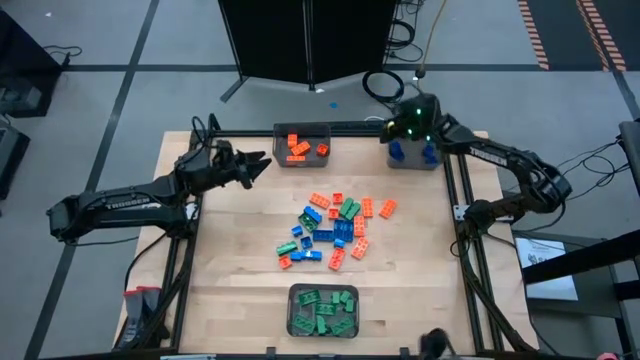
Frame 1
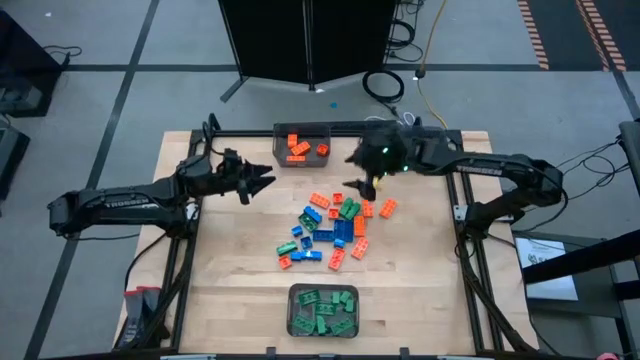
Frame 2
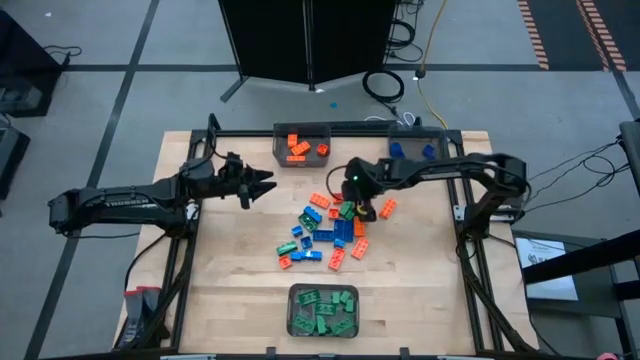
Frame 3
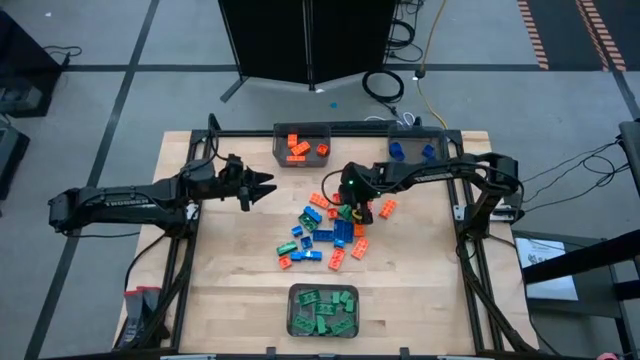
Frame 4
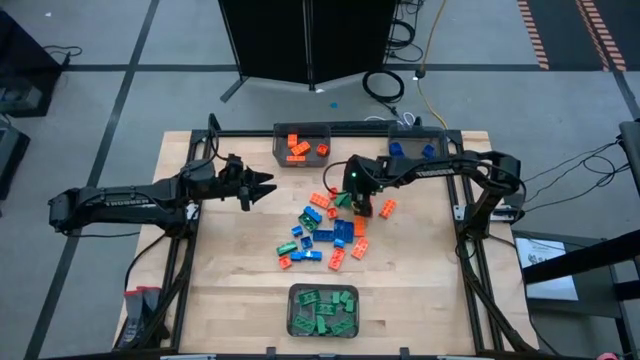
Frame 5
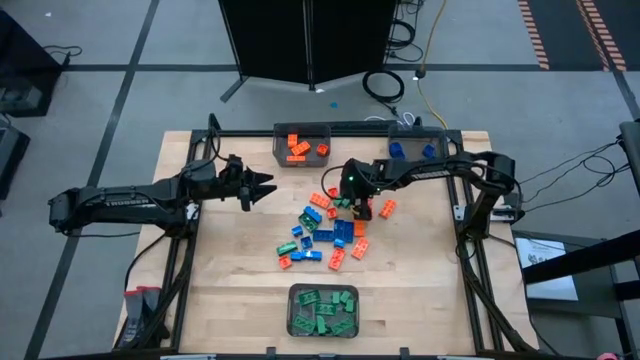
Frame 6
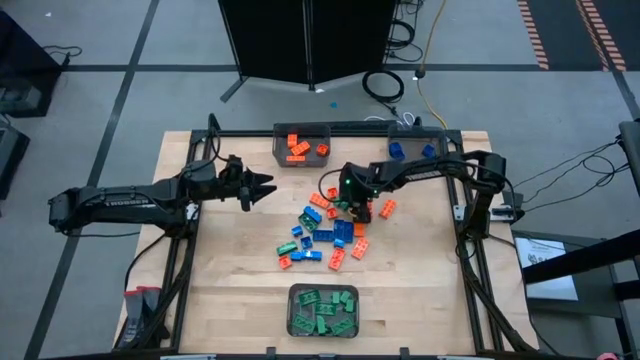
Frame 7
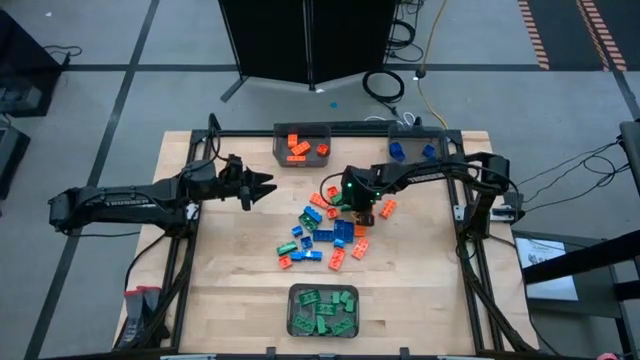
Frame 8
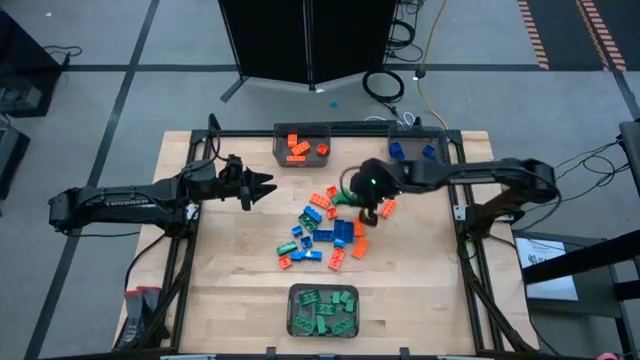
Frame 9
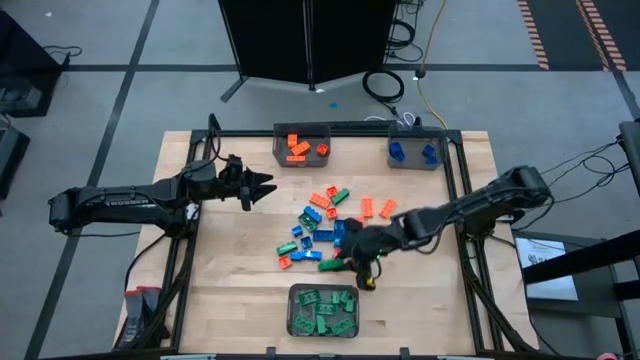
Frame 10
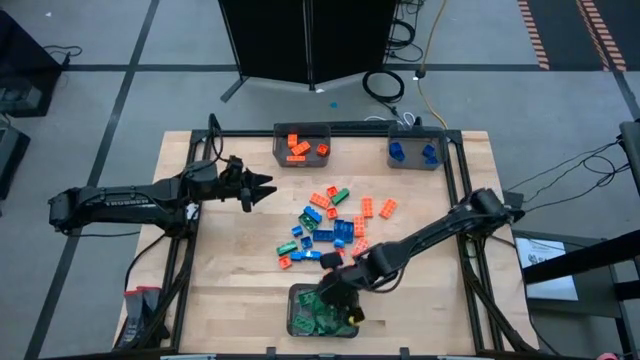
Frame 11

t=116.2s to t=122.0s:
Task: Sort blocks
Put the green game piece into the bottom black bin

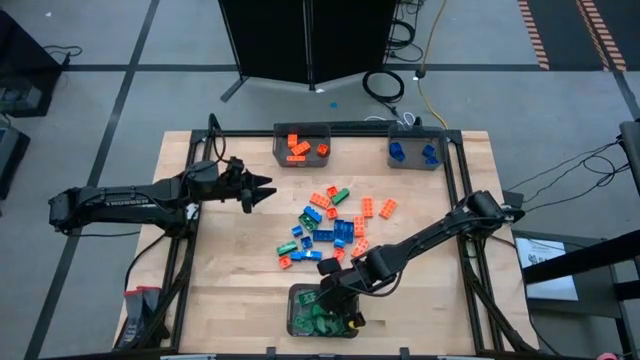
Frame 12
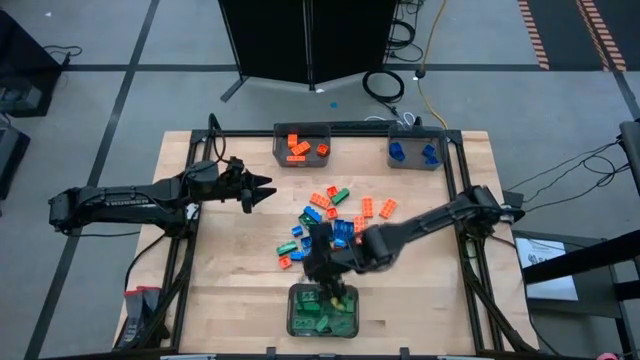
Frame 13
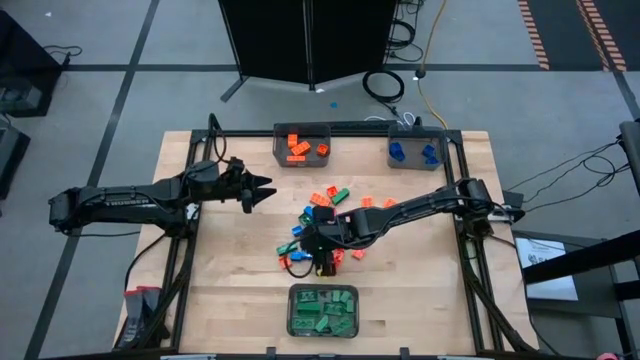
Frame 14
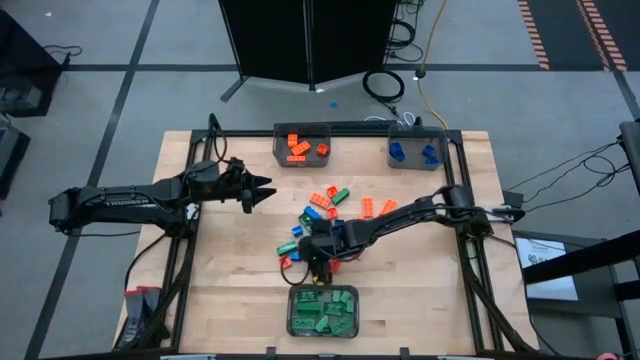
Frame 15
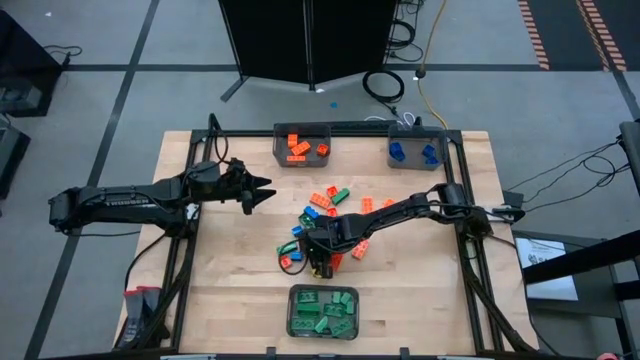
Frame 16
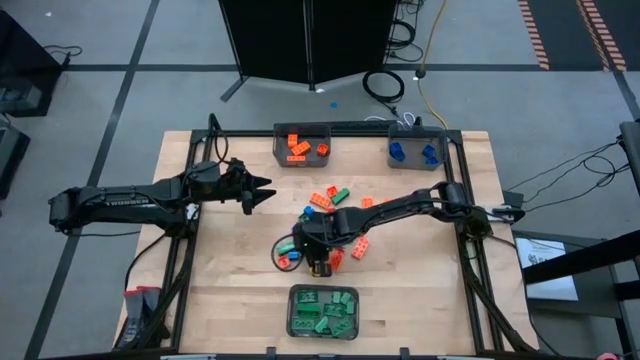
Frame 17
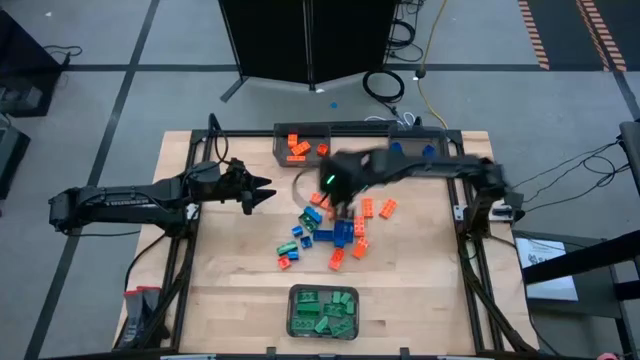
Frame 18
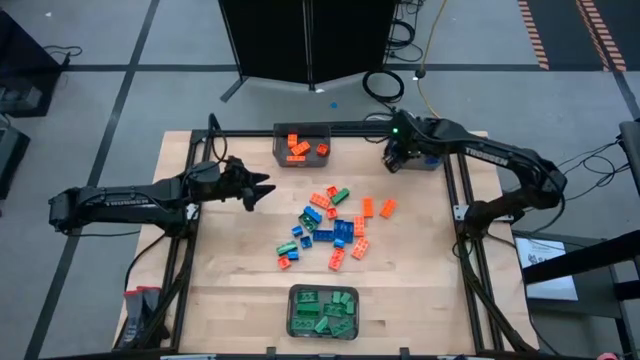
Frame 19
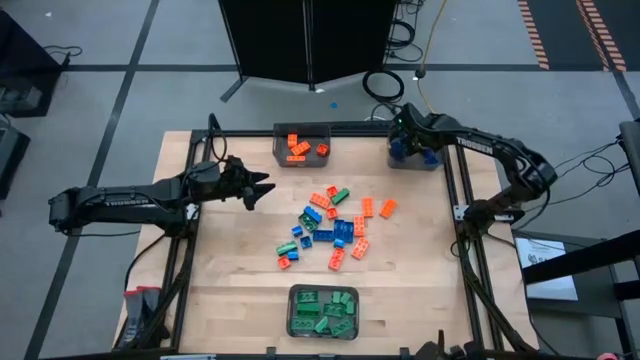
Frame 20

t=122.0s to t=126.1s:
Put the blue game piece into the top right black bin

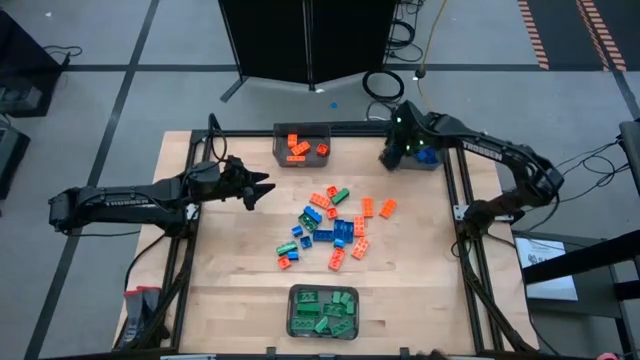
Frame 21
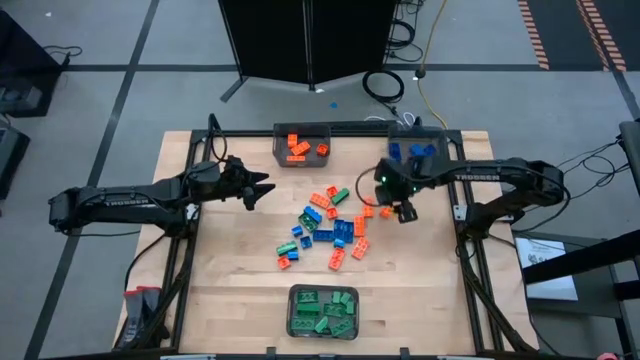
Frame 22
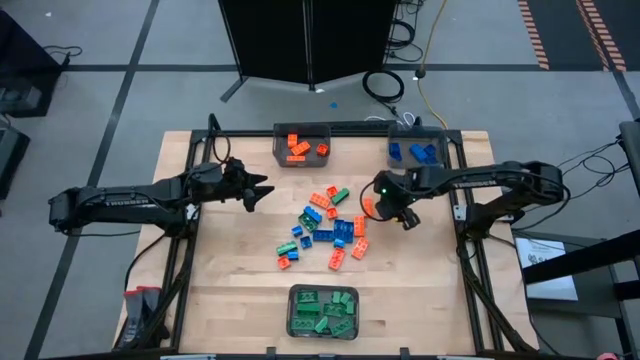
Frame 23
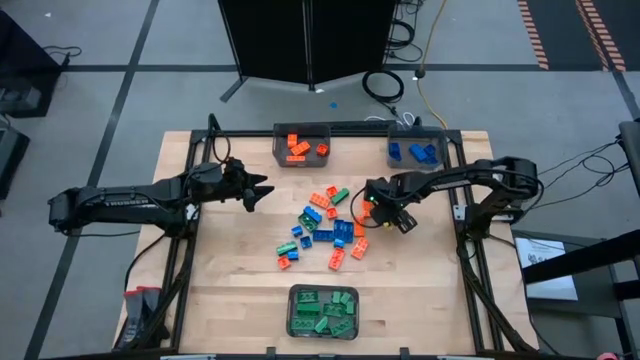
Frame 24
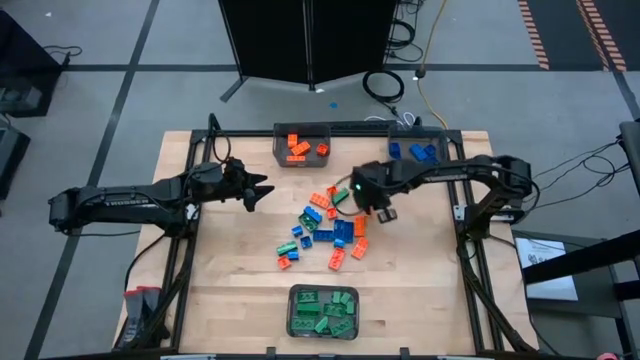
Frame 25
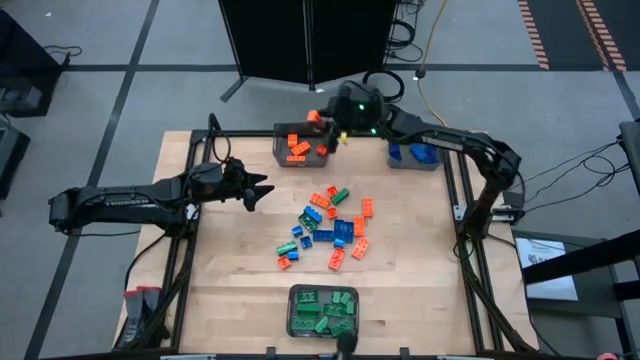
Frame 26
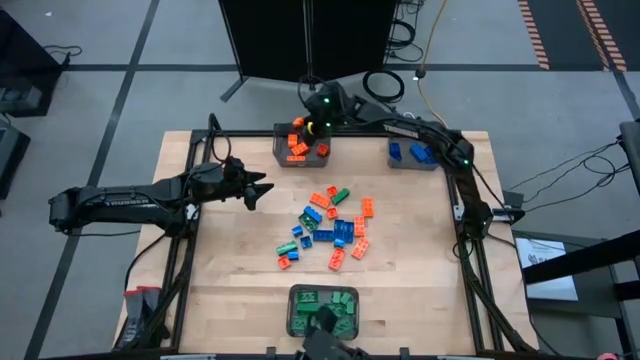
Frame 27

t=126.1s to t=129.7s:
Put the orange game piece into the top left black bin

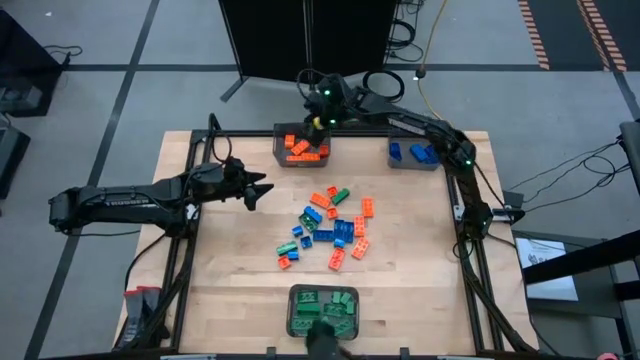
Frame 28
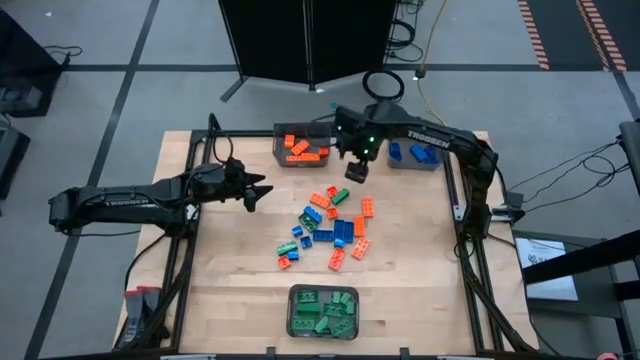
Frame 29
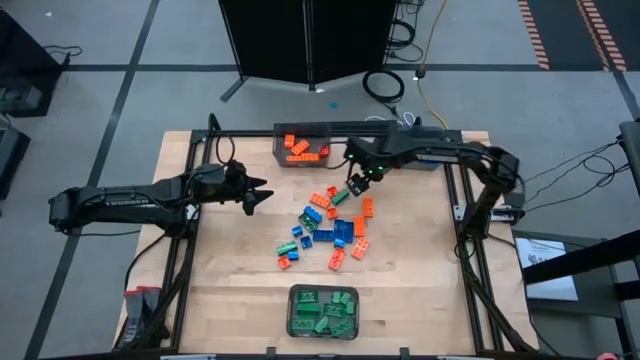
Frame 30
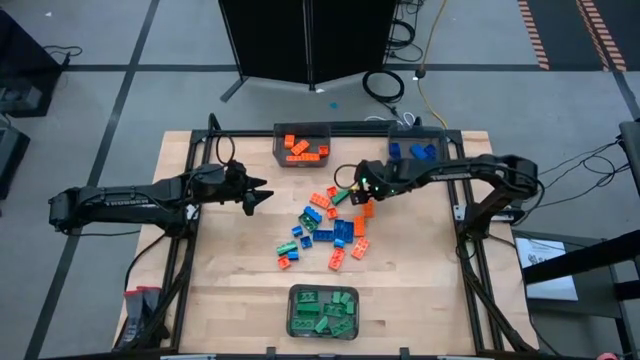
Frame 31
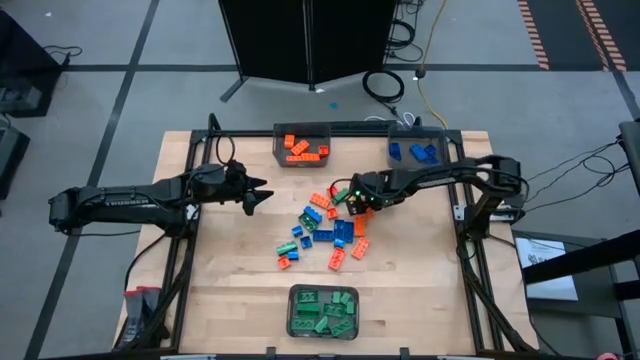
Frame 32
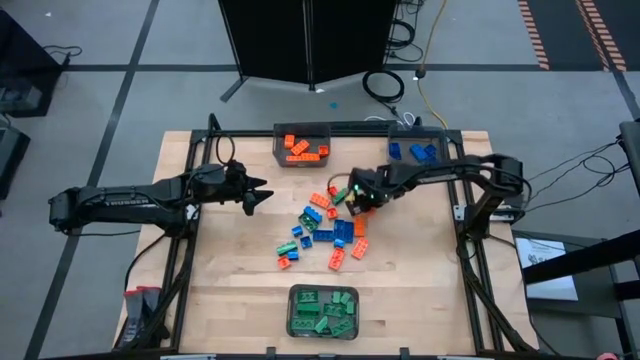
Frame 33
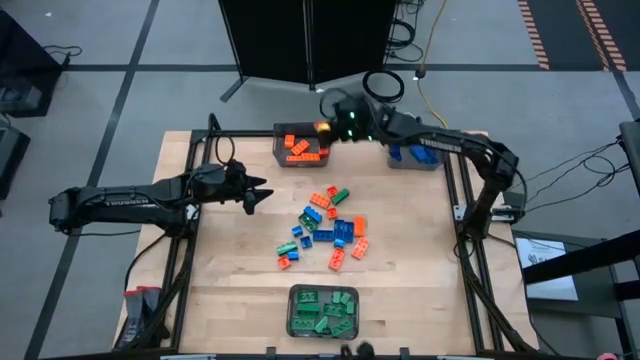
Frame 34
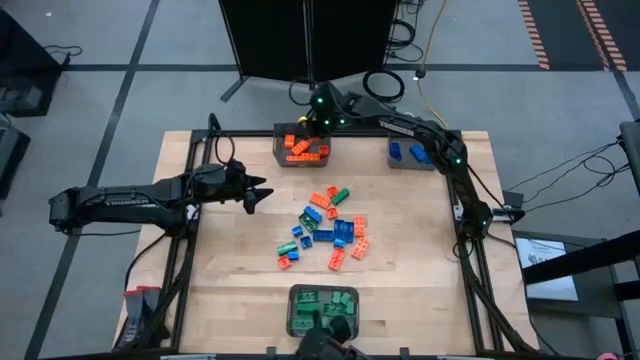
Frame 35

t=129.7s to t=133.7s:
Put the orange game piece into the top left black bin

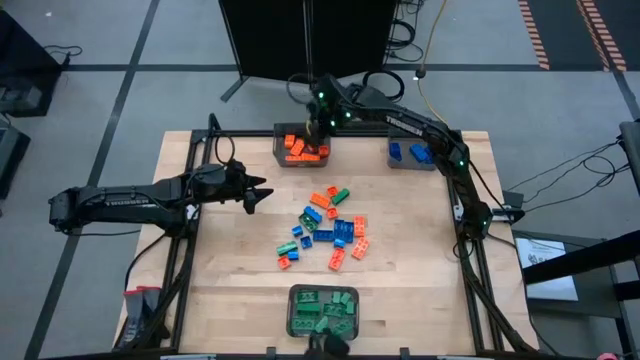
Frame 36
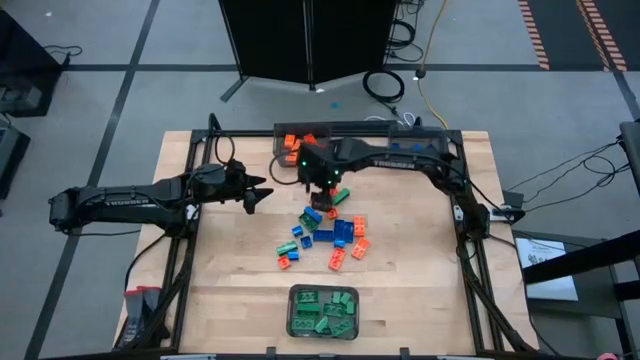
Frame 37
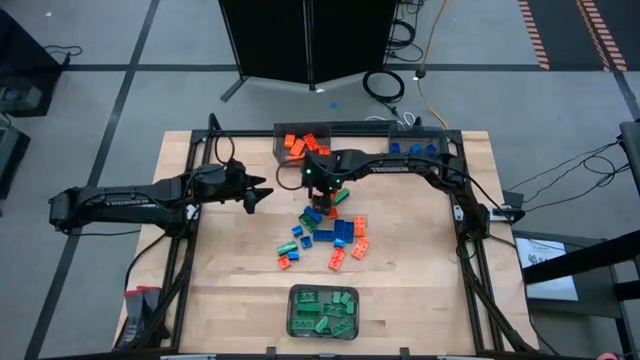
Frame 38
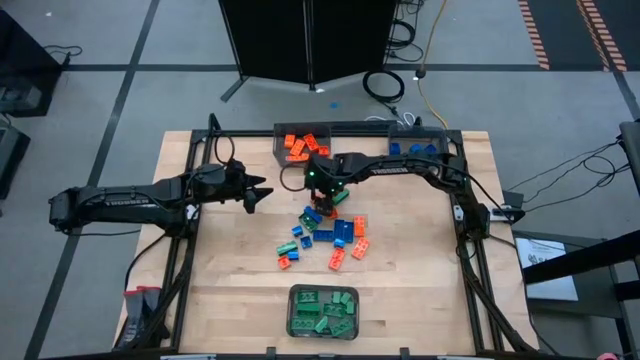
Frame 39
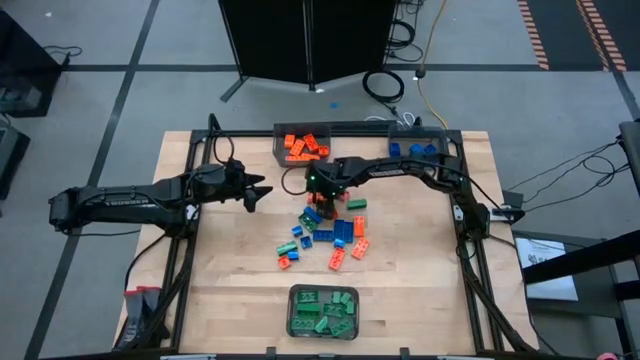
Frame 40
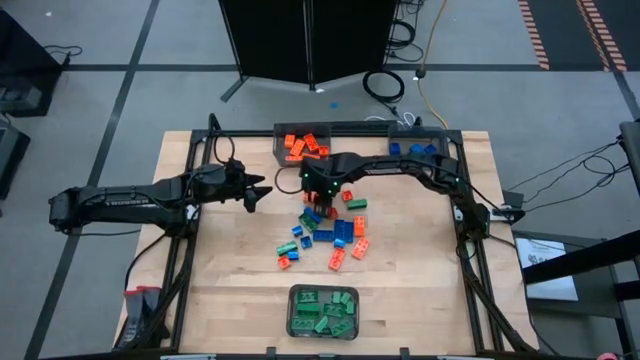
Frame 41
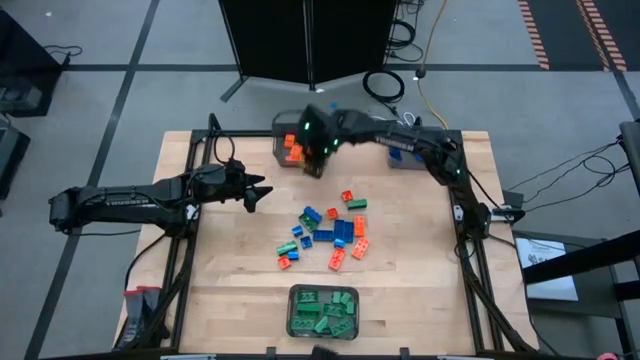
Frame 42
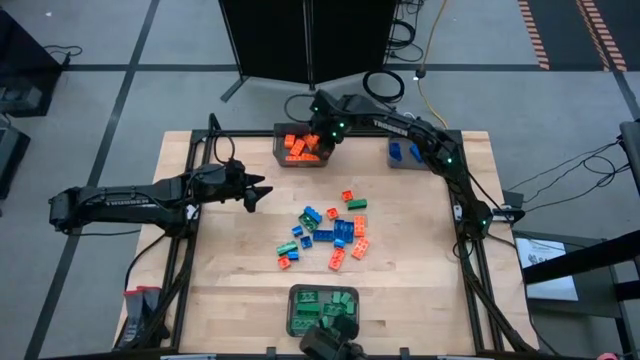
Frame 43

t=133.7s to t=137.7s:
Put the orange game piece into the top left black bin
